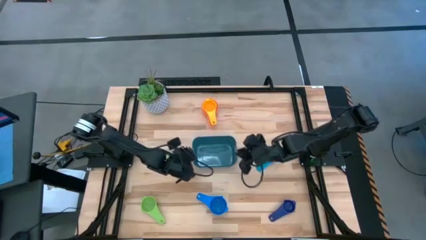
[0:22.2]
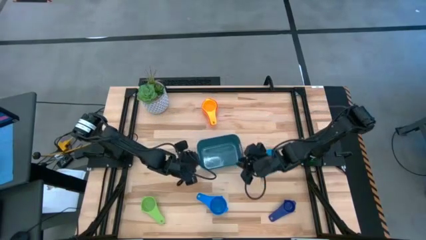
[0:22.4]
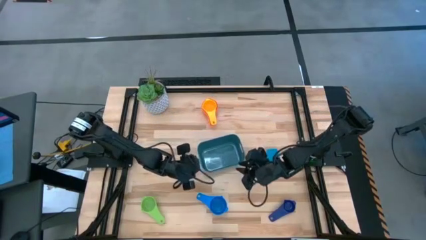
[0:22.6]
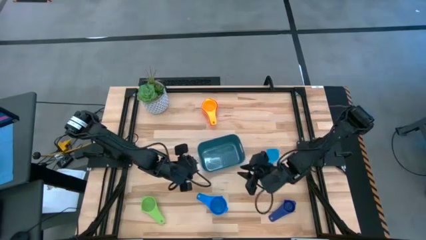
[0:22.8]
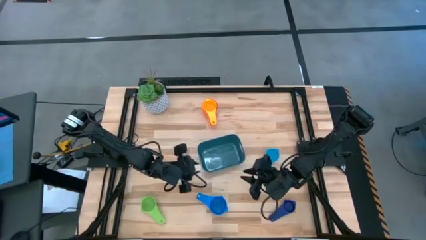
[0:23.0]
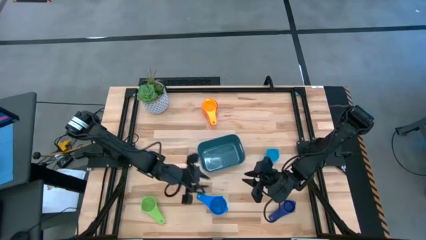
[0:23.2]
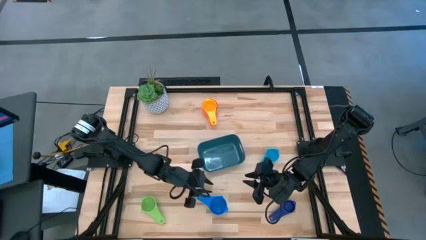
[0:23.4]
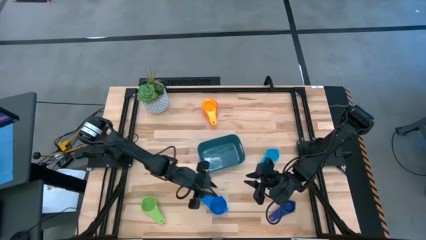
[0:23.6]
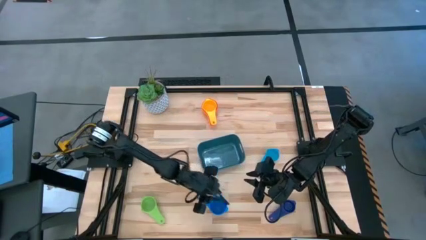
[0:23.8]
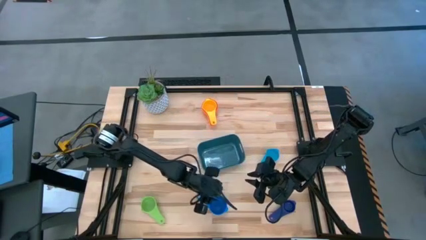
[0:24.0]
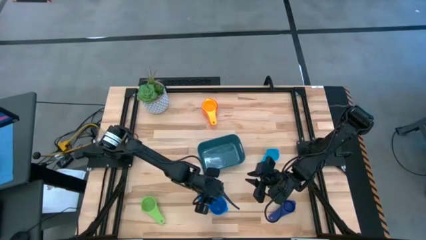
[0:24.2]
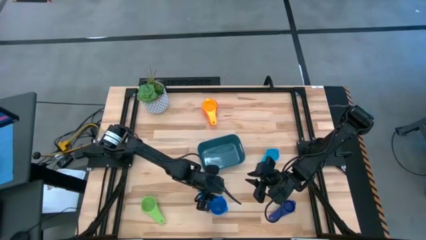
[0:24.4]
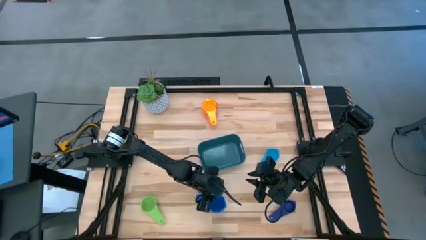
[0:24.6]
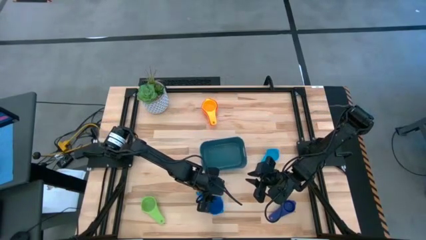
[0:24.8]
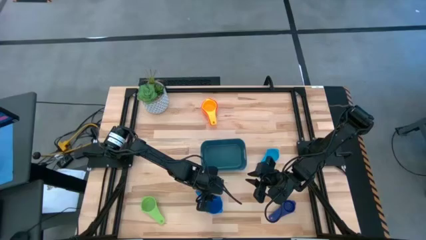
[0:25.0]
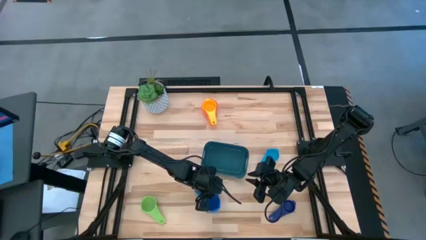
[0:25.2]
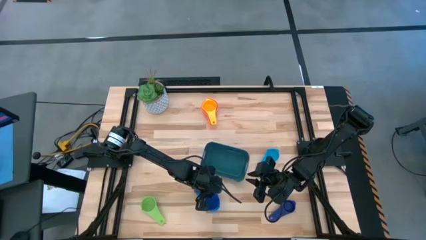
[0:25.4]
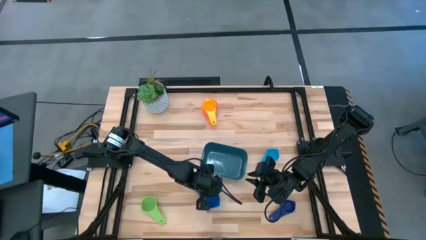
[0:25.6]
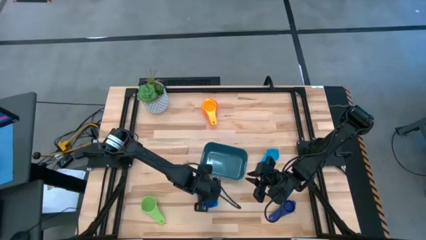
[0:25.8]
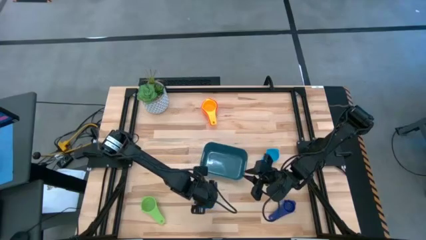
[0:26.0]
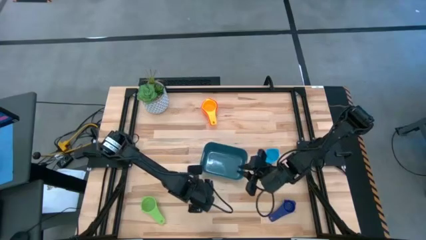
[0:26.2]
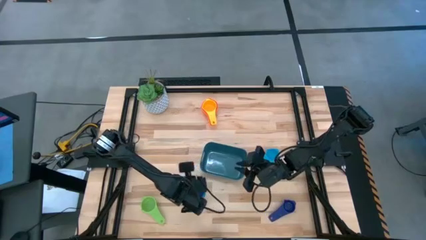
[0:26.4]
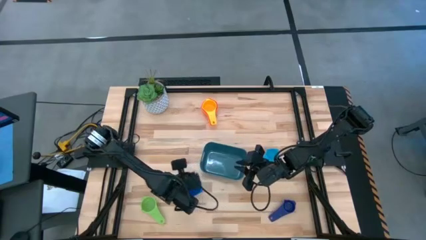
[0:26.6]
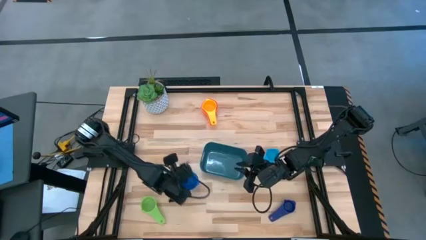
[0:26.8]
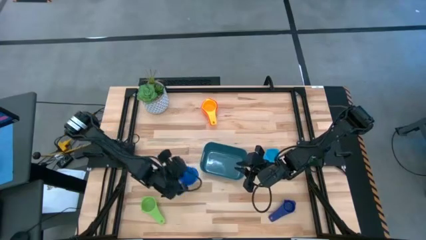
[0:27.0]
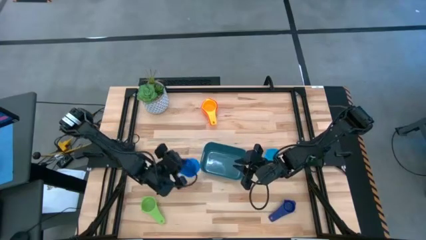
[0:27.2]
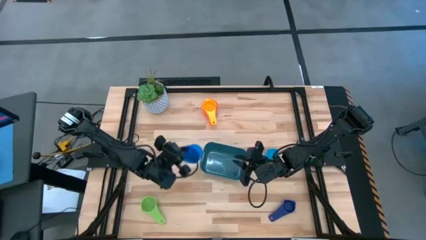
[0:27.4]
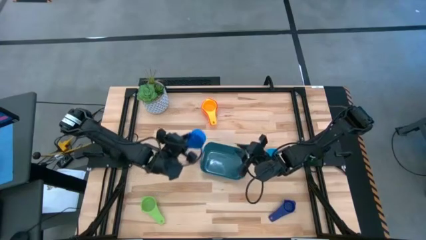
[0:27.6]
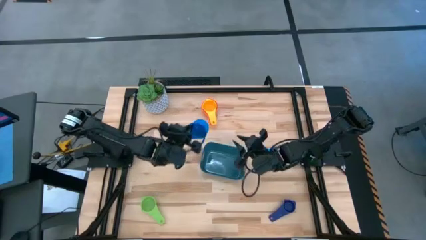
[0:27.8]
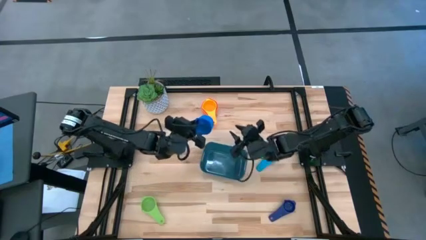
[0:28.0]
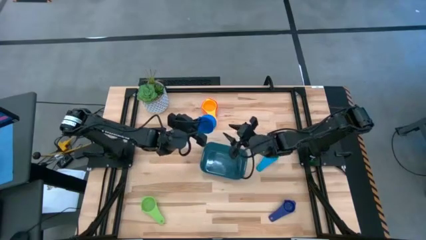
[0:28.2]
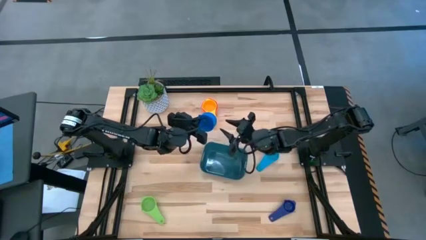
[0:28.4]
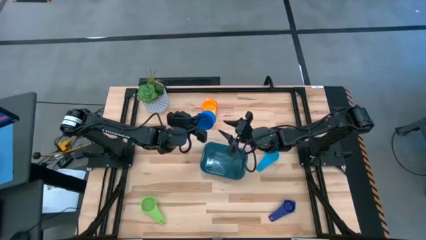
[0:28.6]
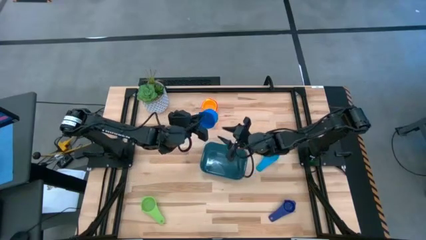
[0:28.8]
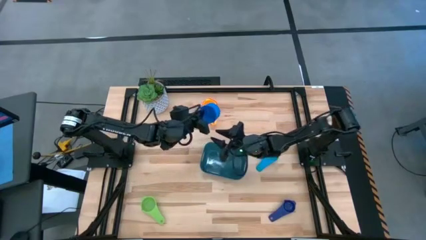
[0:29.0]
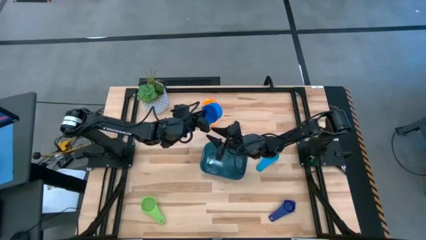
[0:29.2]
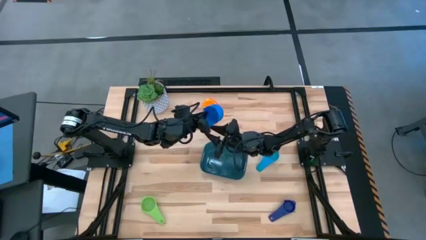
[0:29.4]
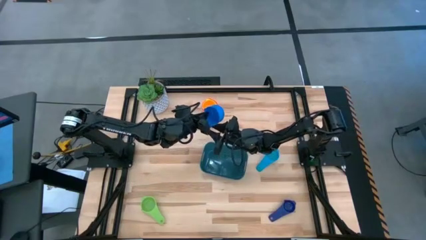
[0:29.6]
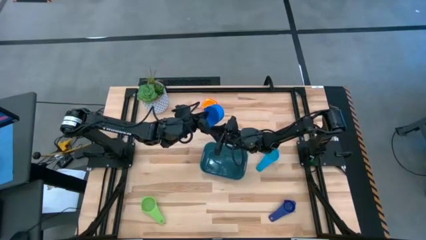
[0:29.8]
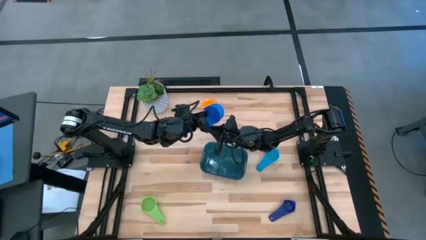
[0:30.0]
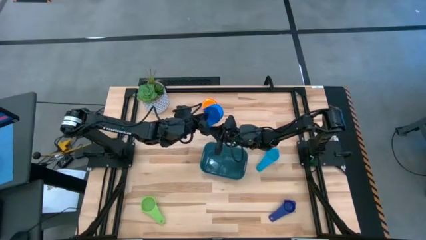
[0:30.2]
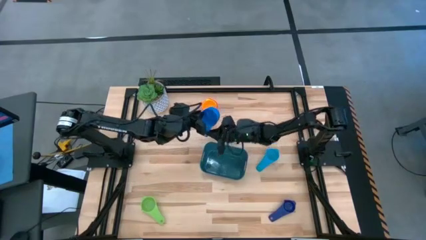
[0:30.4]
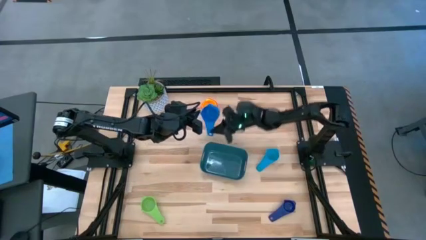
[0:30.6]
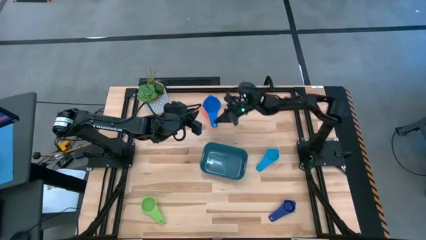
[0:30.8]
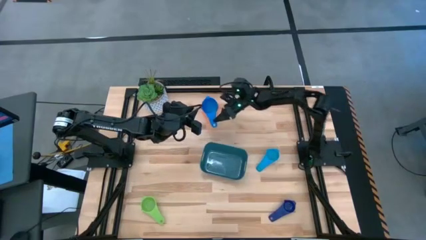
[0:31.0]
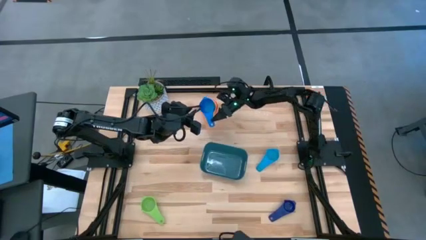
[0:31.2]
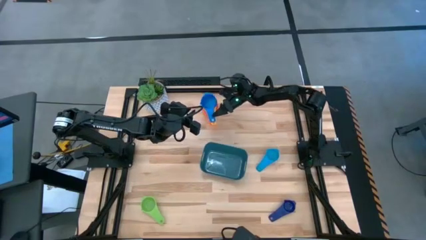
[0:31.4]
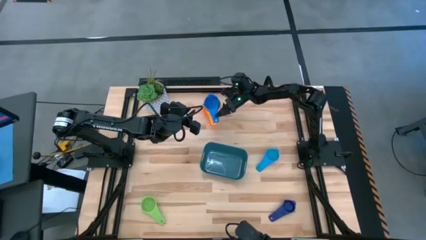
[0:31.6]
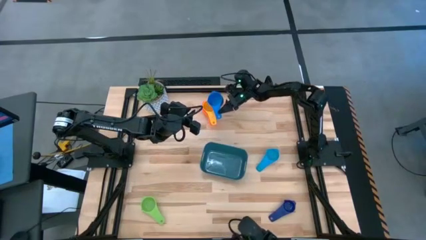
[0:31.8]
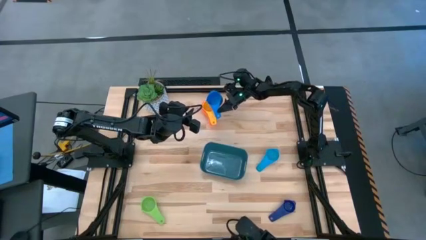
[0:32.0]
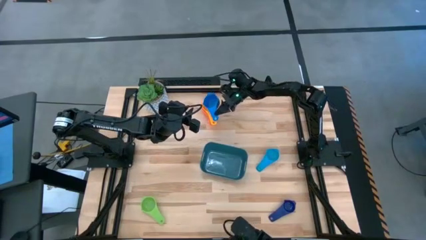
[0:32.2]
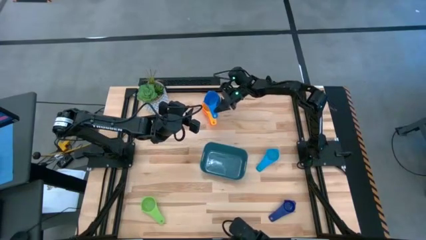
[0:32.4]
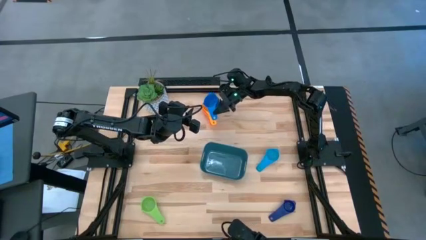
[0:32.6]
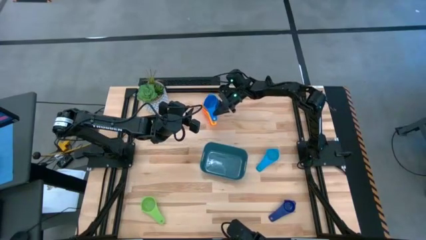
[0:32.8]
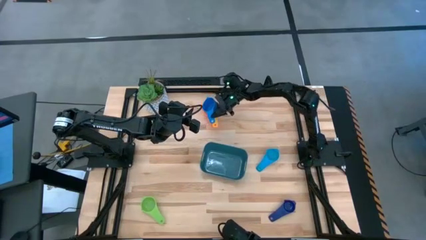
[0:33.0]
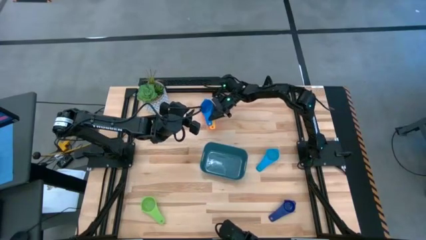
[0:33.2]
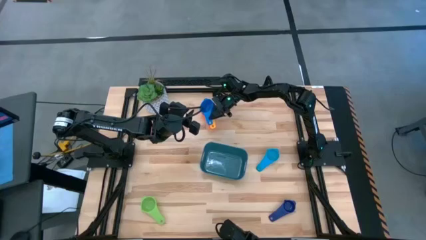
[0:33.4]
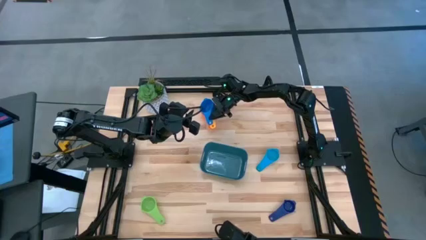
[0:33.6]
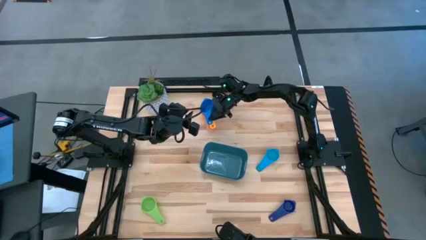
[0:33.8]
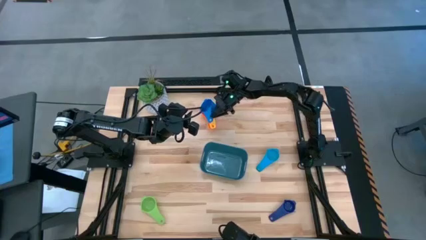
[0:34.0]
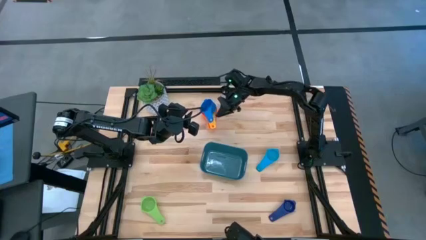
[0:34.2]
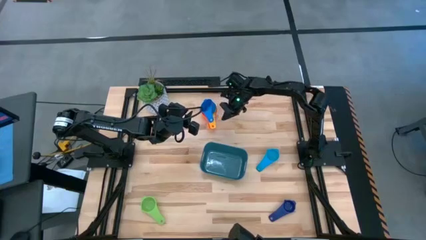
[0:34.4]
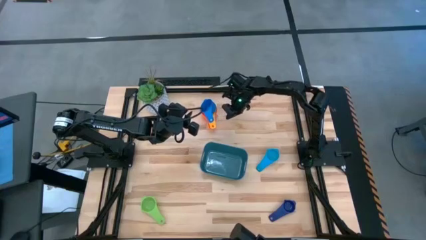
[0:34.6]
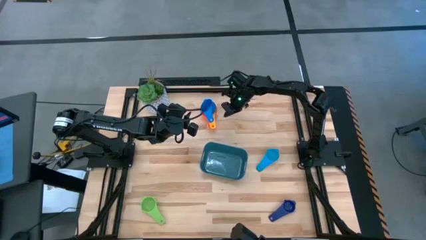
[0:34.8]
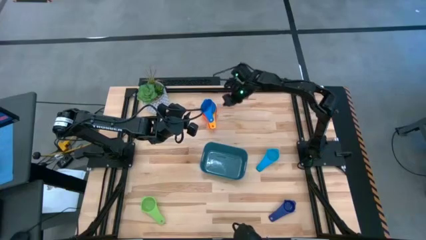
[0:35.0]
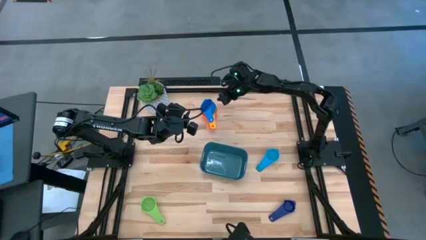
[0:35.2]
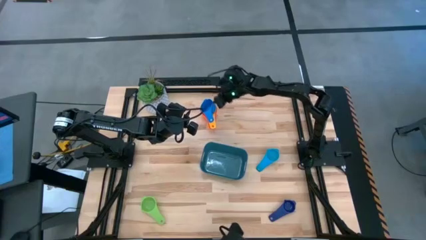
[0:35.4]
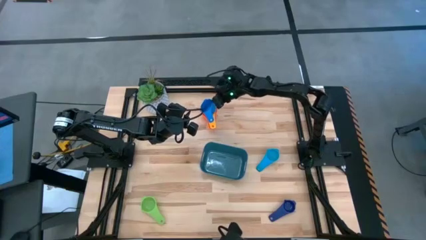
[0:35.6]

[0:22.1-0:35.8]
Task: Nest measuring cups in basket
Stack the blue measuring cup on top of the red measuring cup

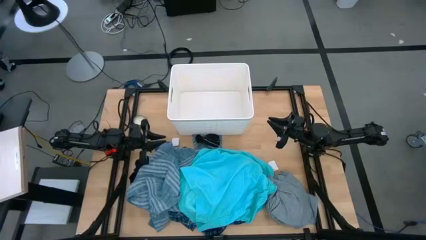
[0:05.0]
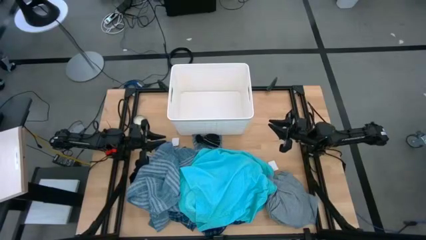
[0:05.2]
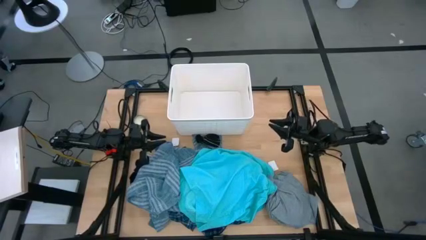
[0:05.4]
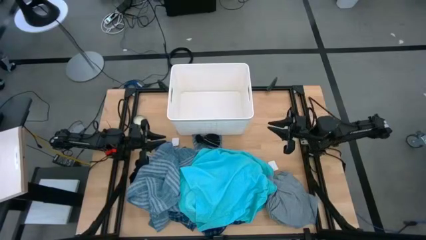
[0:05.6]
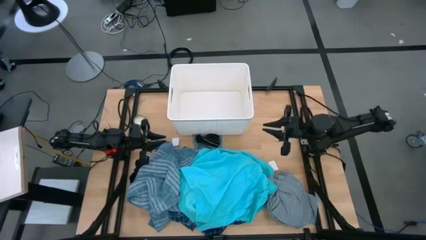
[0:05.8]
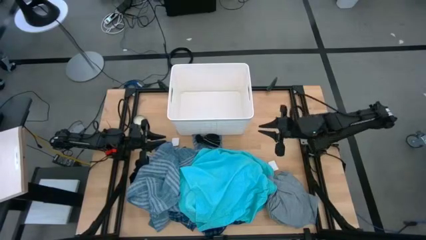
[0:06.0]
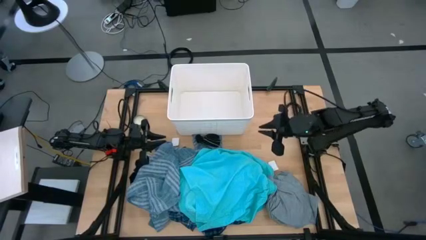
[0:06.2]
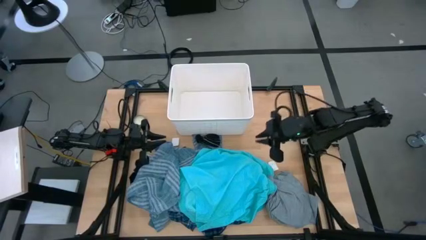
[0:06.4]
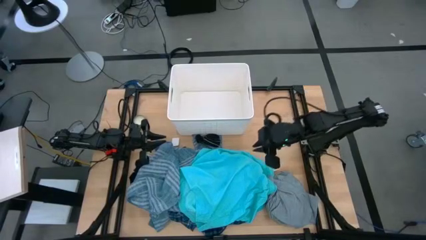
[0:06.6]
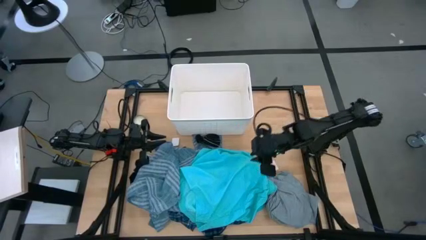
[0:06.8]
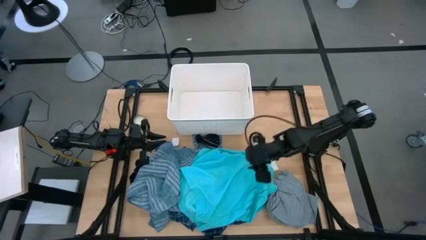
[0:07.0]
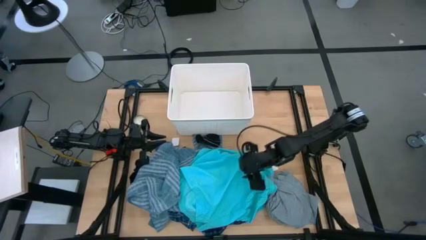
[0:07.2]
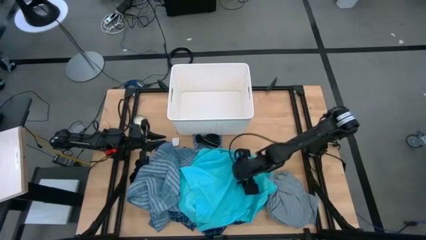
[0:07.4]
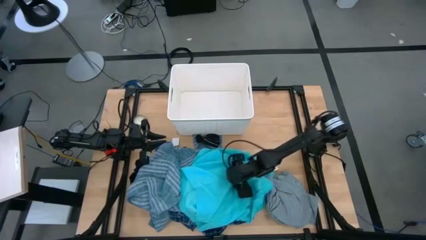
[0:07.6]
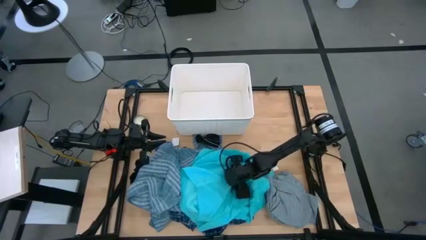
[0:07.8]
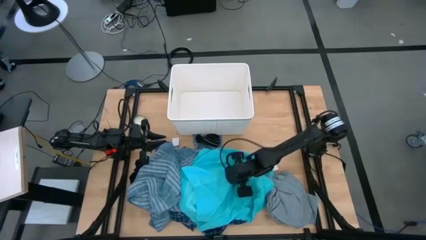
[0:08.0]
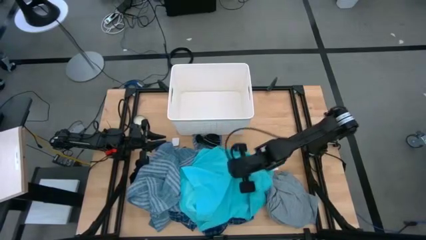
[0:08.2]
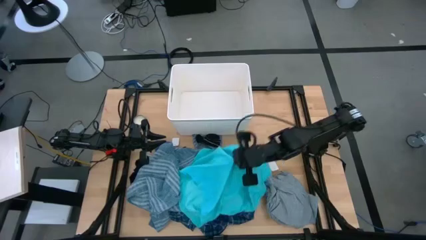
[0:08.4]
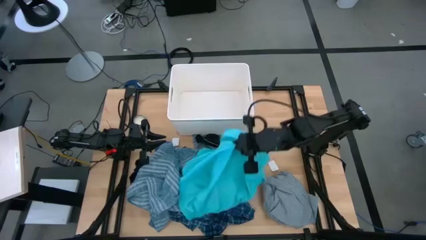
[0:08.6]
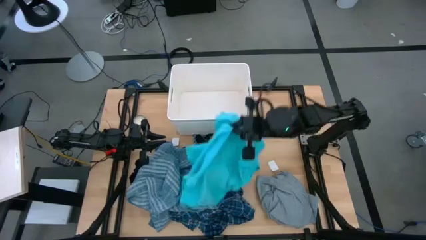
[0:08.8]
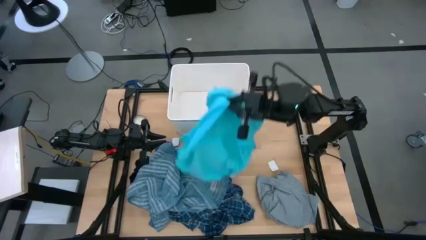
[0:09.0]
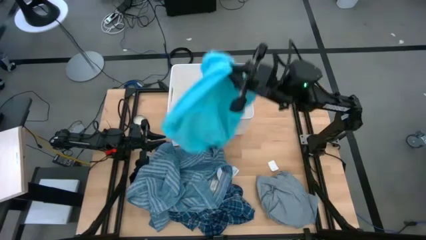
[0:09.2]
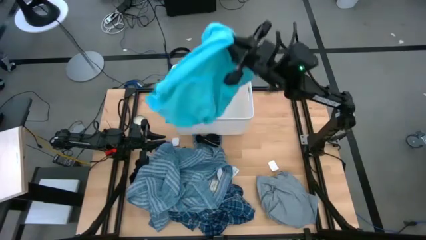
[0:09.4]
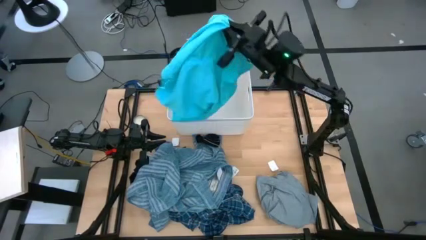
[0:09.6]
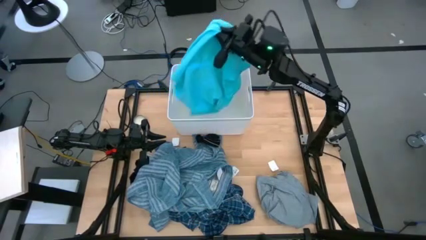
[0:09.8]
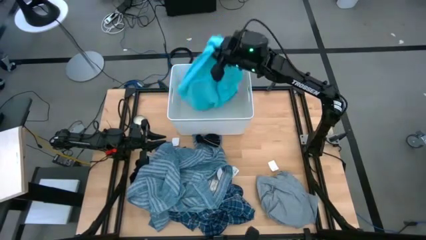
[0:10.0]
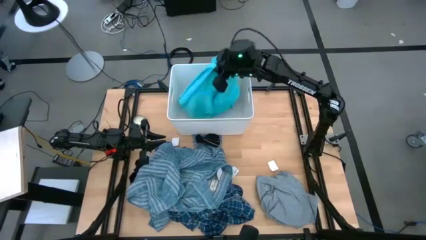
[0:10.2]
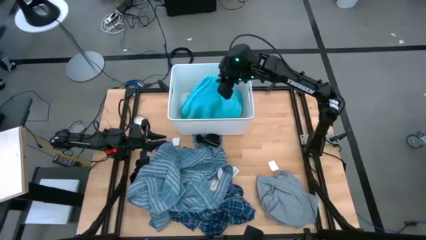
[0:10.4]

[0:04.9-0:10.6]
Task: Sort clothes
Put the light blue shirt into the white laundry bin
